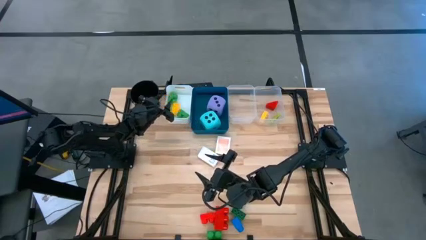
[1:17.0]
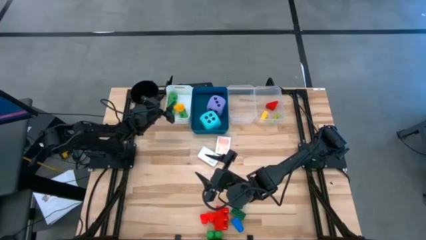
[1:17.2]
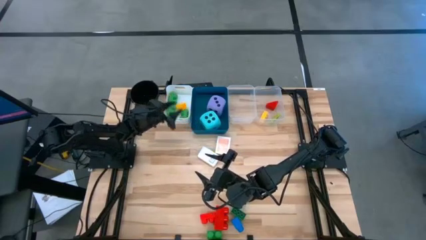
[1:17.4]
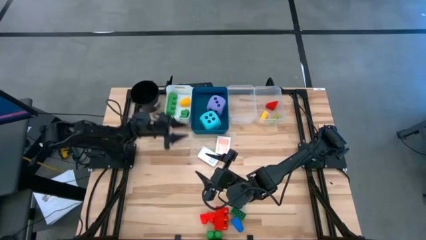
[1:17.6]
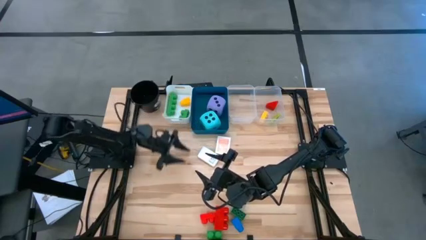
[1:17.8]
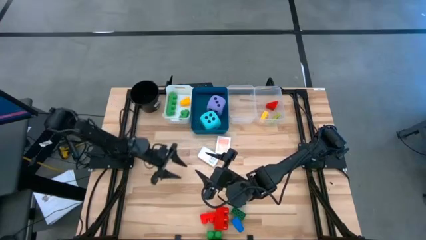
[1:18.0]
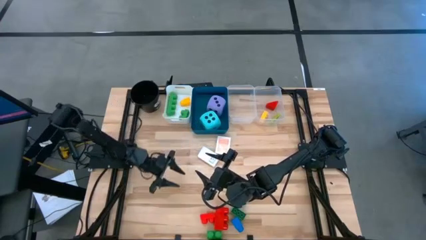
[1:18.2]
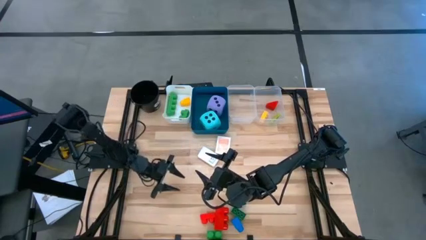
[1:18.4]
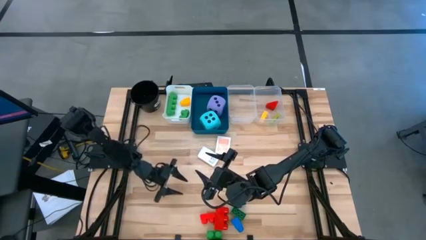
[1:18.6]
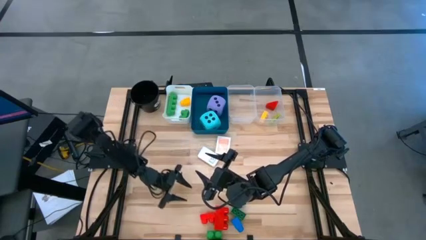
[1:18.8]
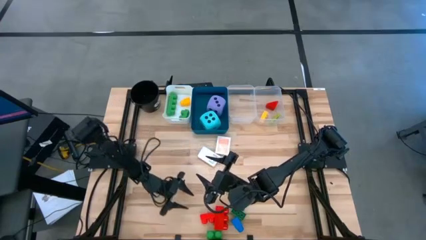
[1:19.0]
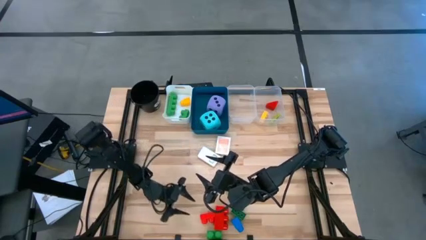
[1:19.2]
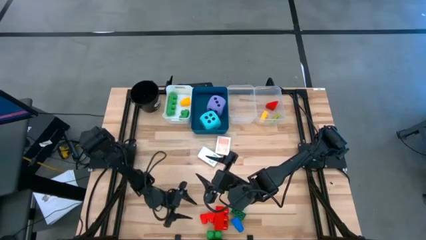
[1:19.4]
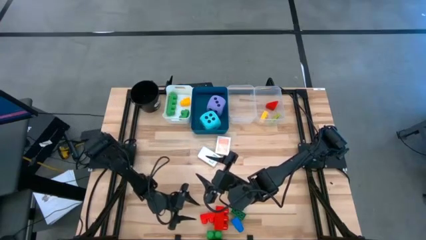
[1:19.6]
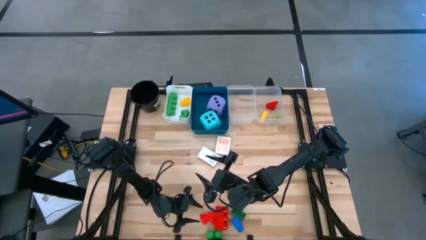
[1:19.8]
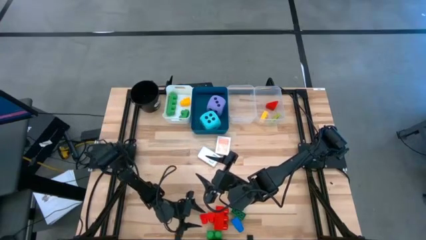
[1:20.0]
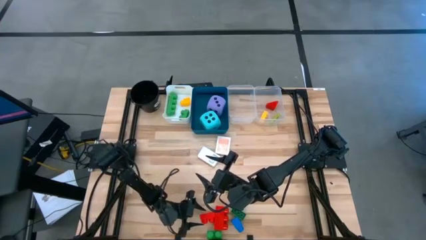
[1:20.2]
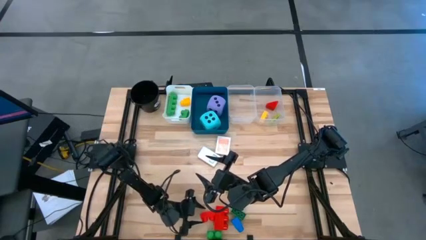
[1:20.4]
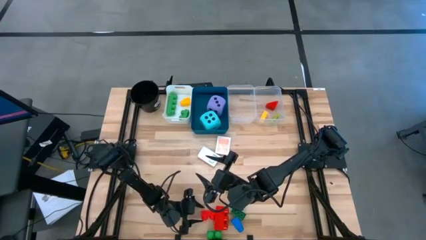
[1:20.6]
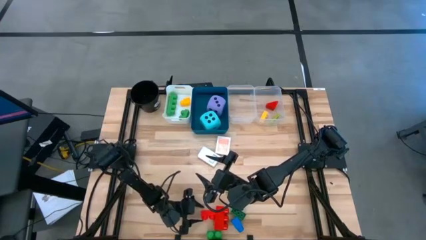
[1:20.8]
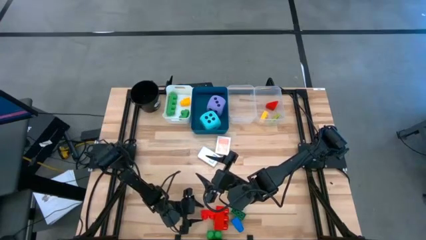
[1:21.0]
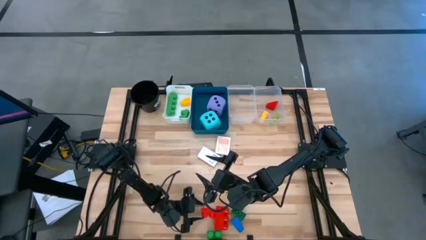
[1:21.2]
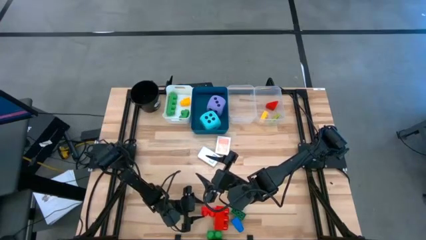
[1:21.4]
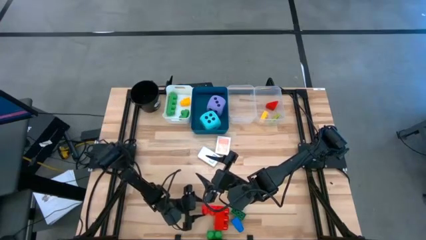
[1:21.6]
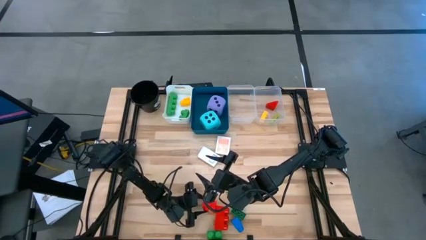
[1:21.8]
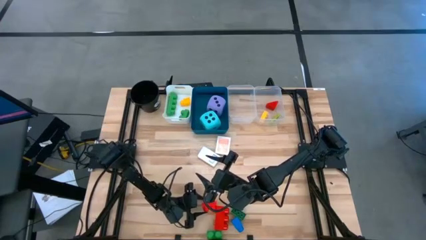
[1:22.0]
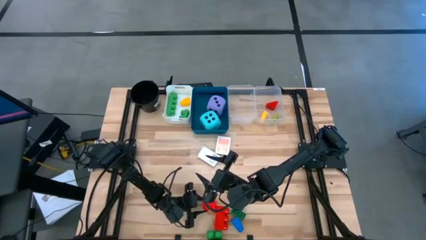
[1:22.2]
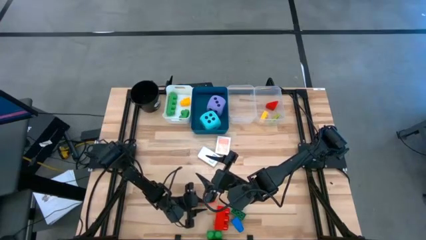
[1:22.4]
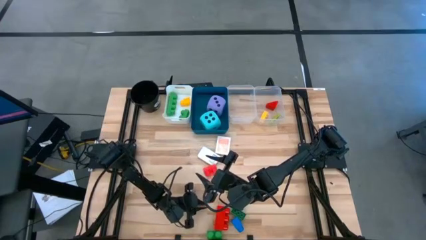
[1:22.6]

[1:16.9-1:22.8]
Task: Pick & Place Toys
Put the large red game piece into the white bin

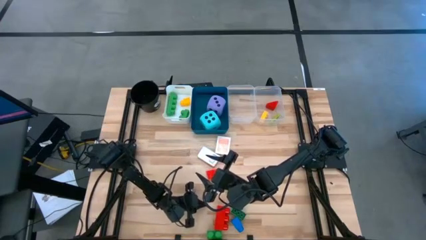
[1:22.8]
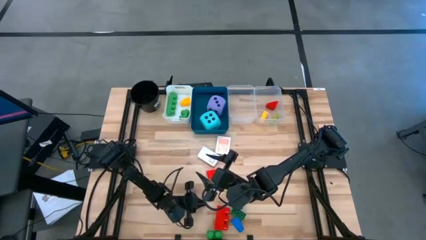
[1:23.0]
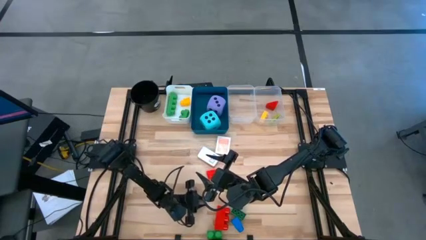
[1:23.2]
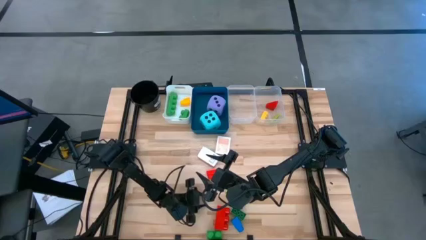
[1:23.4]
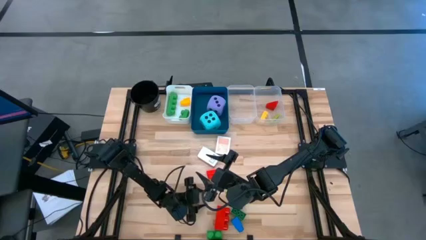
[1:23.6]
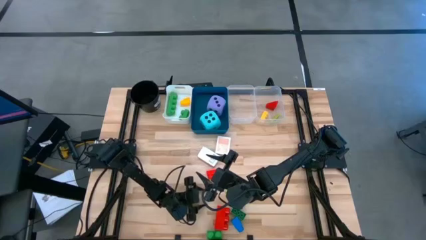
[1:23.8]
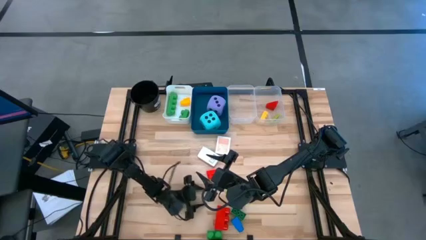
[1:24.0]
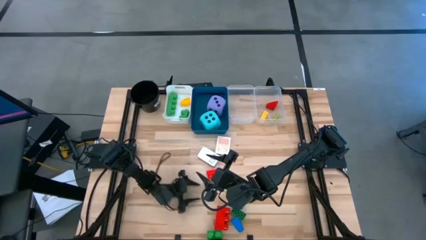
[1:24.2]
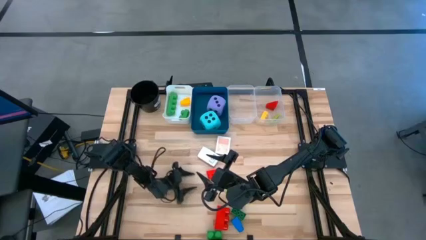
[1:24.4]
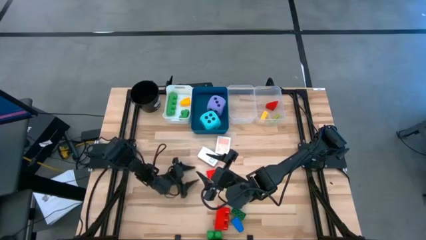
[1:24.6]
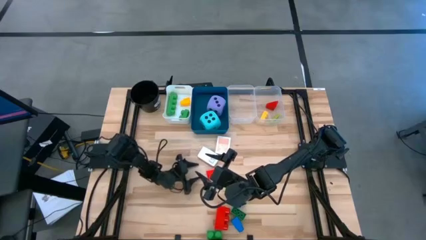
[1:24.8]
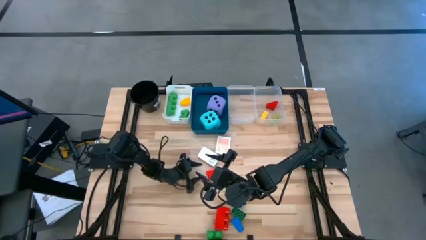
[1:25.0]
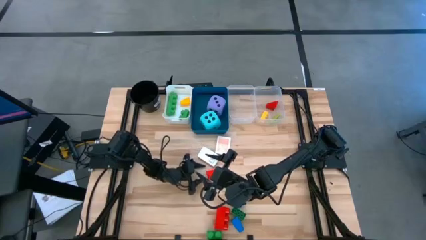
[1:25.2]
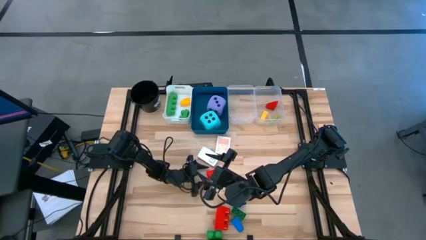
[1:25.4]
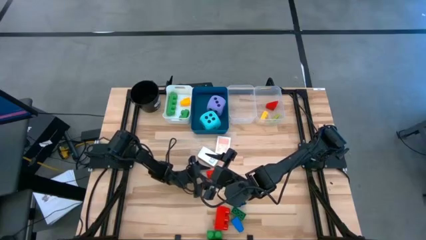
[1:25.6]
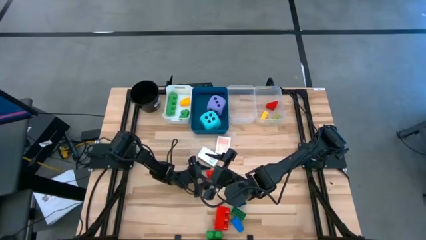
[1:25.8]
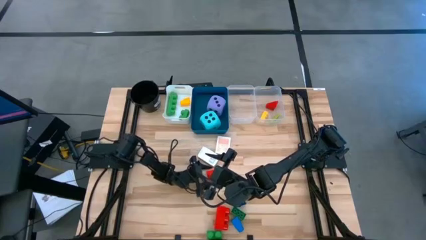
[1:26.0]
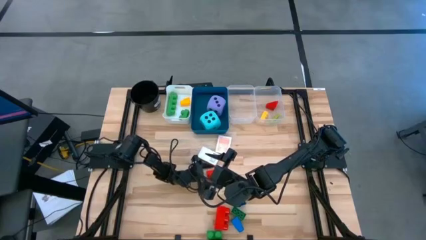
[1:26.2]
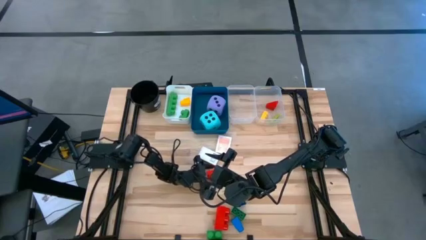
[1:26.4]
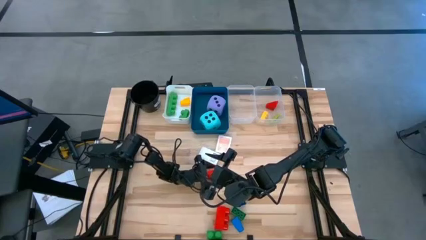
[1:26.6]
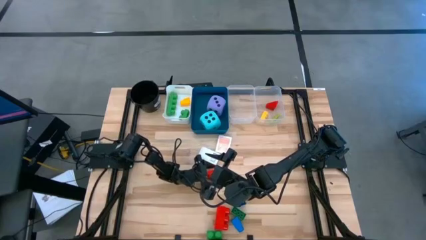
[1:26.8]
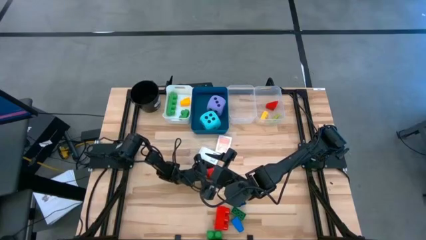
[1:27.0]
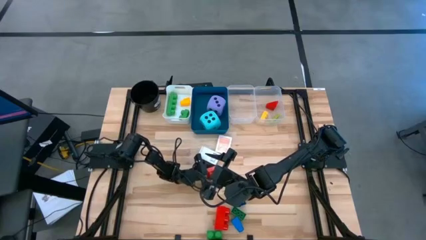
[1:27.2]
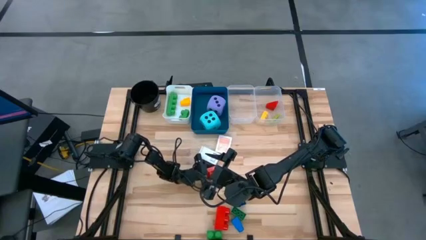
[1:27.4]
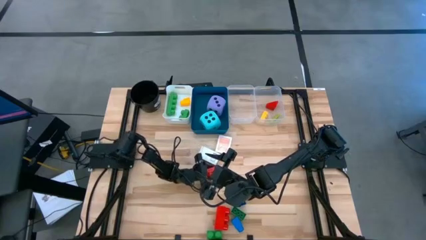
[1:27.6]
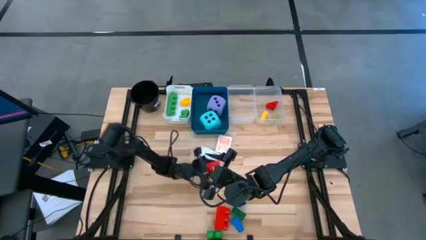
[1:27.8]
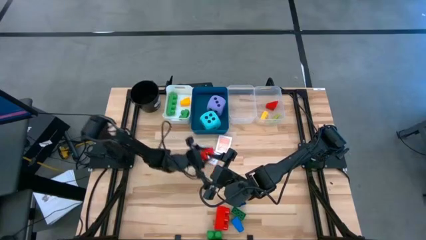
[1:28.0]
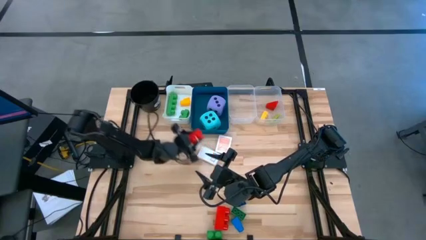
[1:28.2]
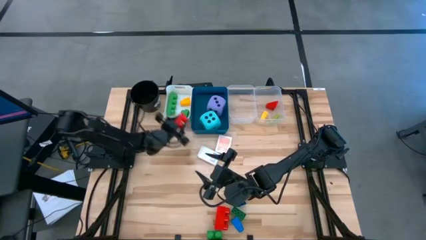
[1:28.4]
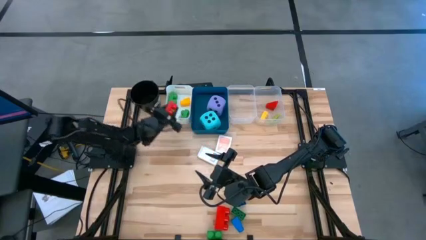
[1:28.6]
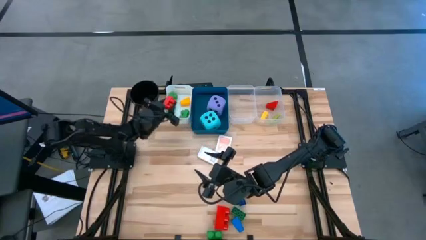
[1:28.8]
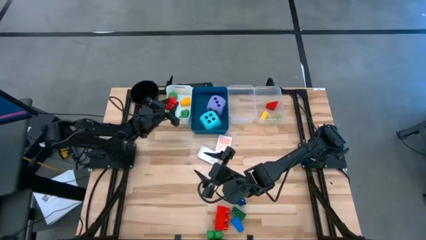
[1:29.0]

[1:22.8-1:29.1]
Put the large red game piece into the white bin

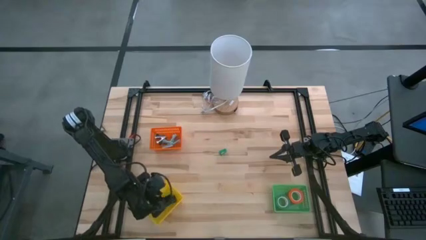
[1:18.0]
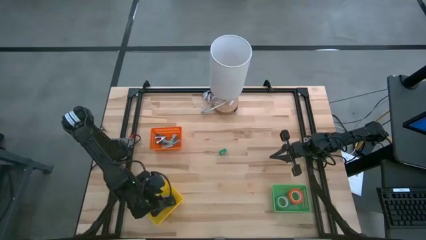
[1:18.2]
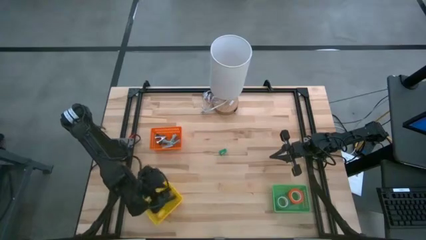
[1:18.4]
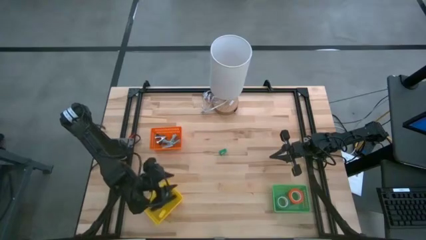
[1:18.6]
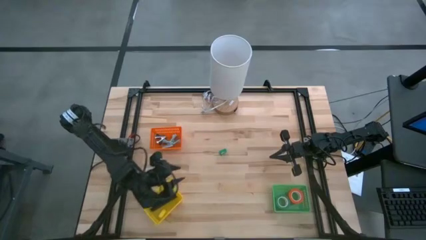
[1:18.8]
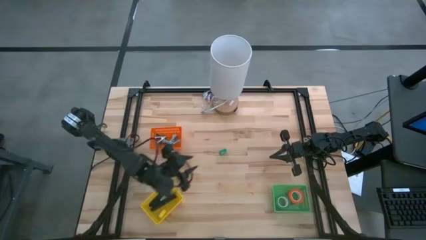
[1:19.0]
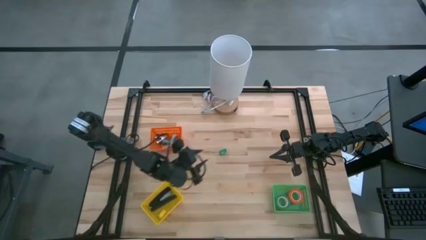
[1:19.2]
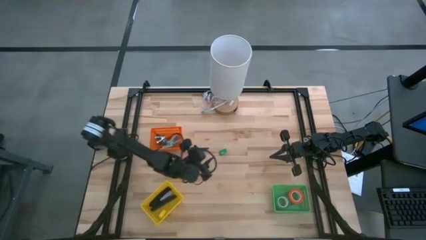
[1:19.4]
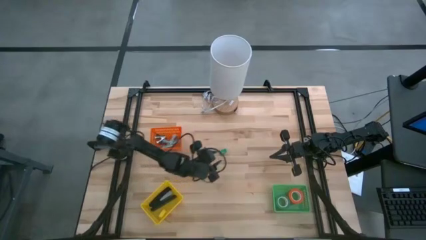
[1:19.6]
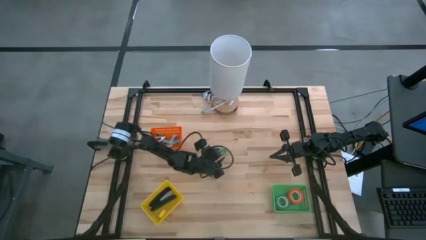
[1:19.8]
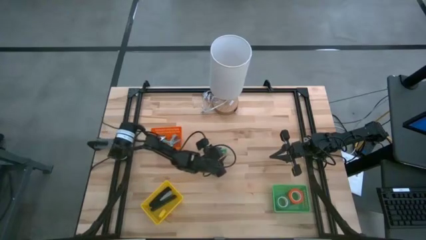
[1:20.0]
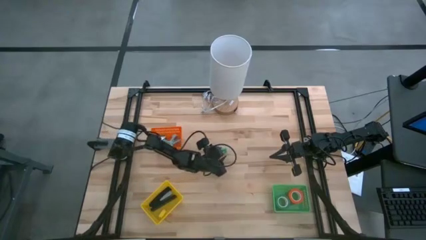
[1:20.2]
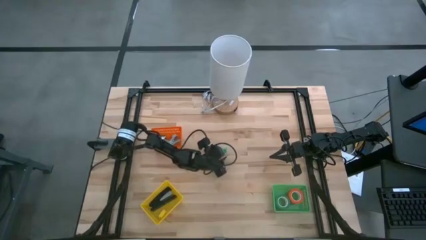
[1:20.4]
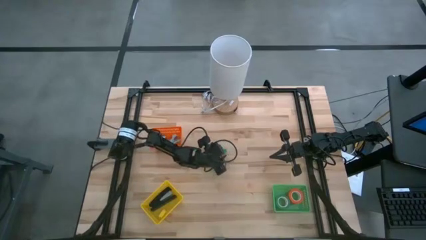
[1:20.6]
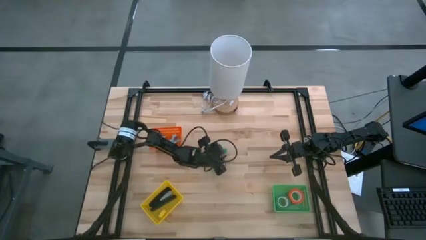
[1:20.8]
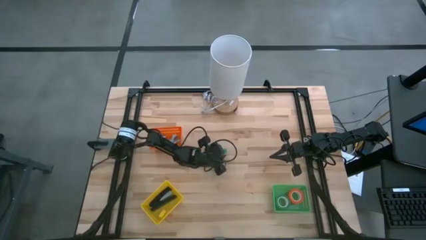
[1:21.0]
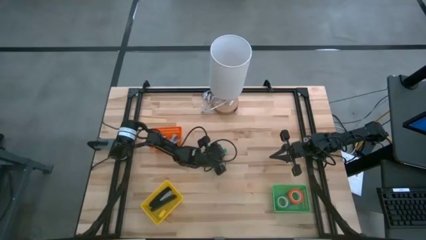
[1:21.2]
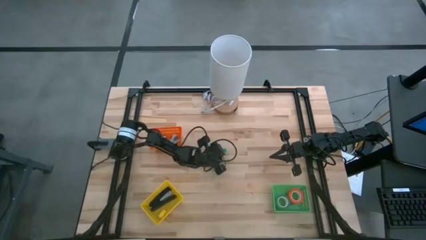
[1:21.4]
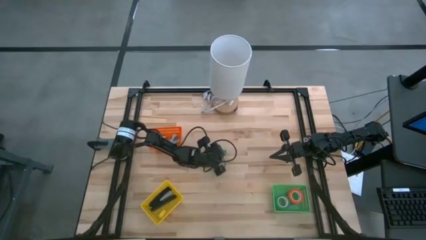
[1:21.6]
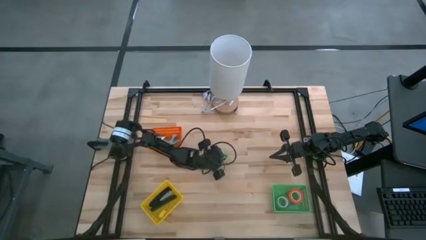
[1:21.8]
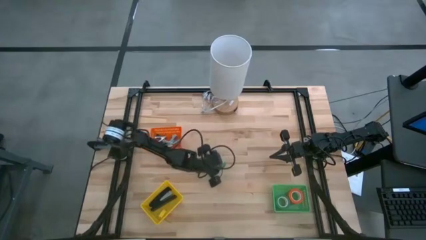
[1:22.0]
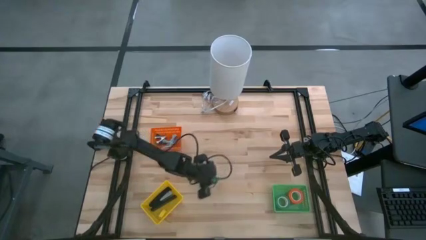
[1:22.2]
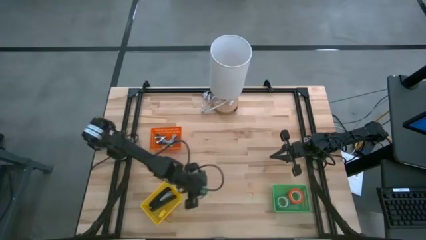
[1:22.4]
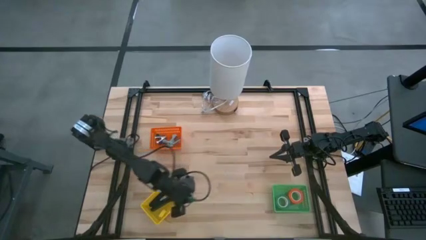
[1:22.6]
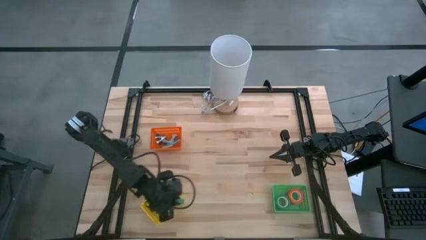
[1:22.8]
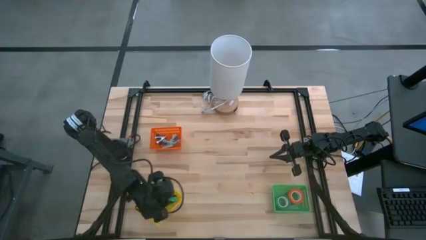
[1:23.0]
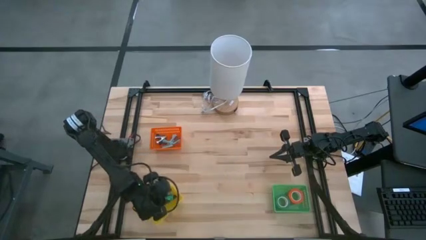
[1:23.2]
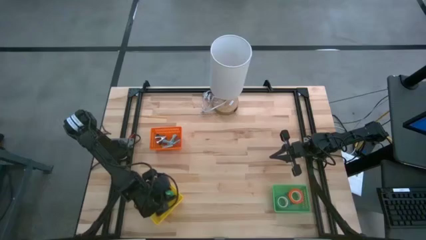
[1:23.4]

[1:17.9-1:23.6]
Task: Pick and place Stapler, Stapler remover, tape
Put the green stapler into the yellow bin
